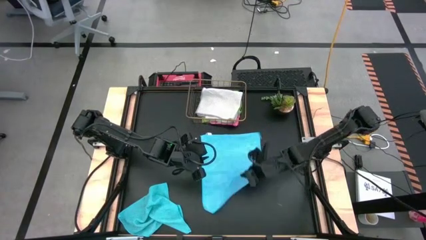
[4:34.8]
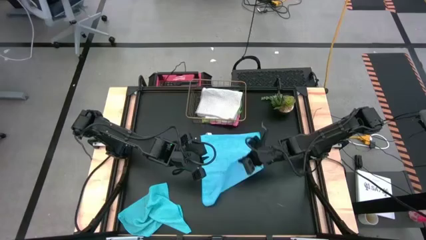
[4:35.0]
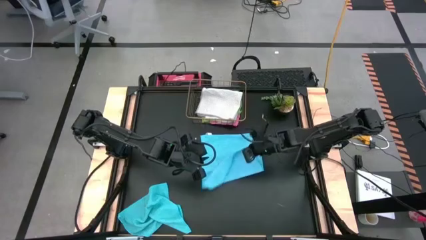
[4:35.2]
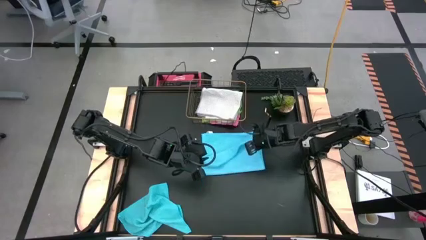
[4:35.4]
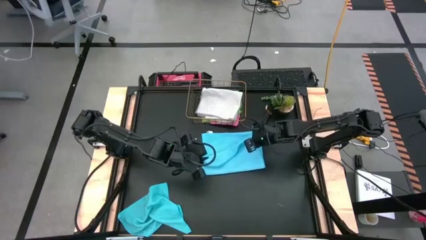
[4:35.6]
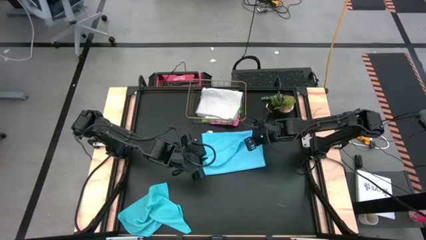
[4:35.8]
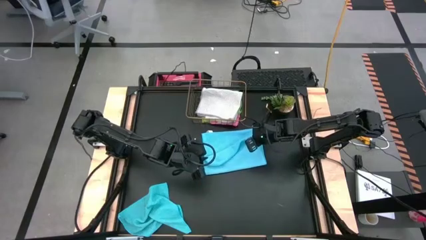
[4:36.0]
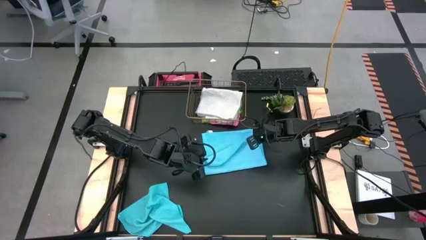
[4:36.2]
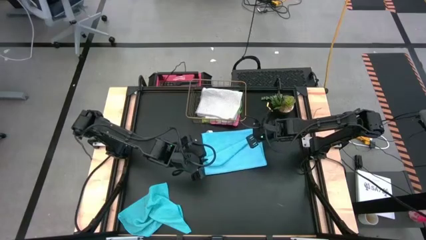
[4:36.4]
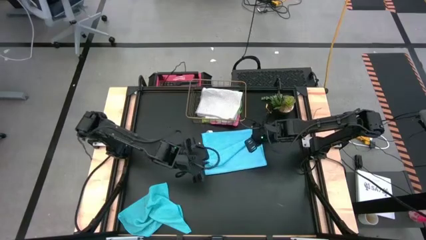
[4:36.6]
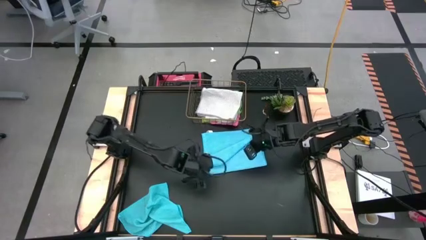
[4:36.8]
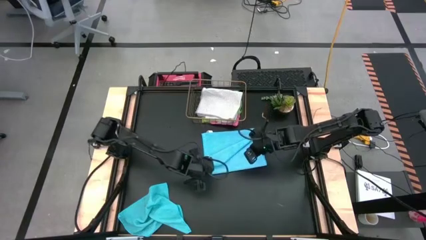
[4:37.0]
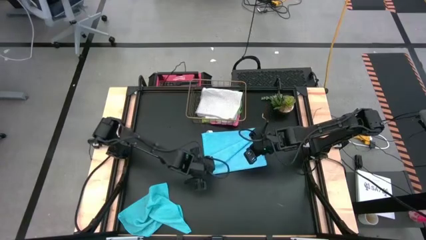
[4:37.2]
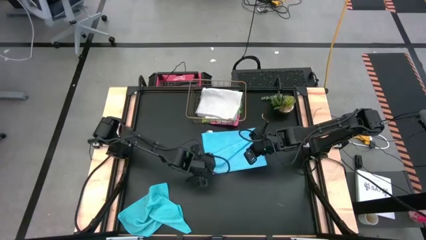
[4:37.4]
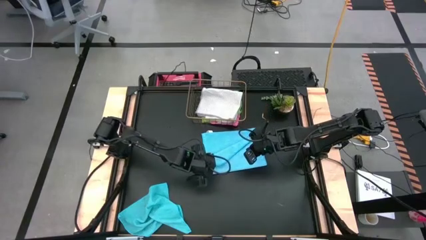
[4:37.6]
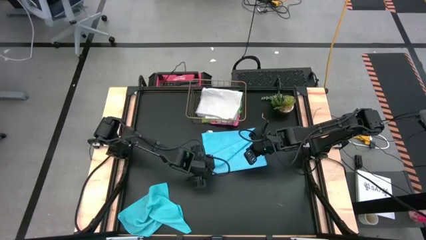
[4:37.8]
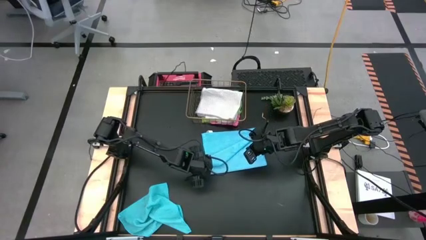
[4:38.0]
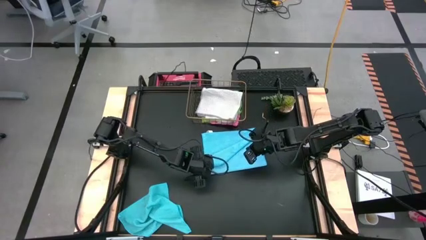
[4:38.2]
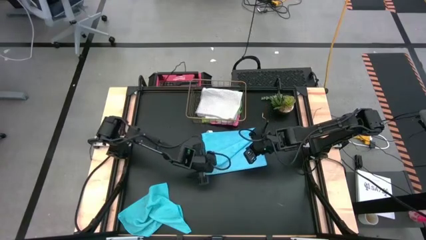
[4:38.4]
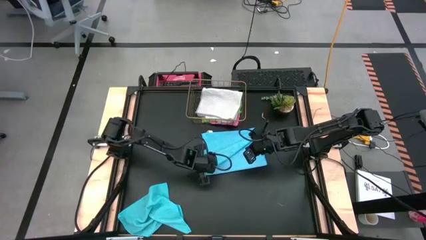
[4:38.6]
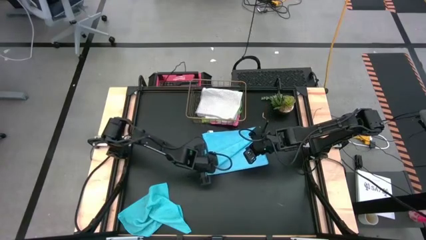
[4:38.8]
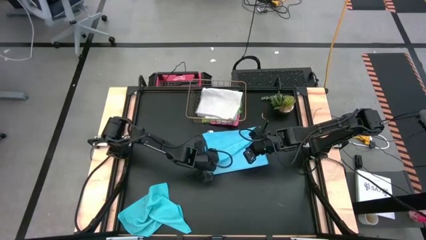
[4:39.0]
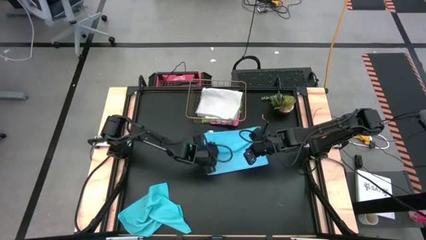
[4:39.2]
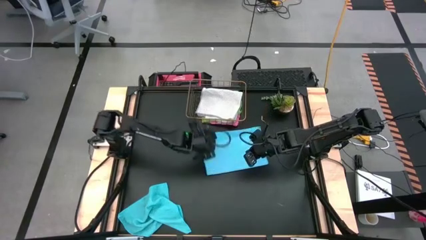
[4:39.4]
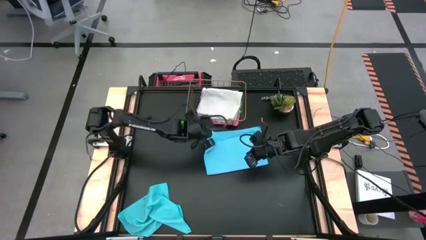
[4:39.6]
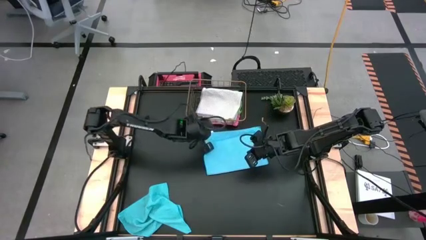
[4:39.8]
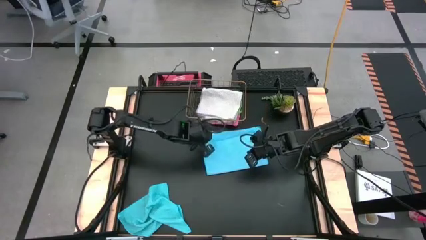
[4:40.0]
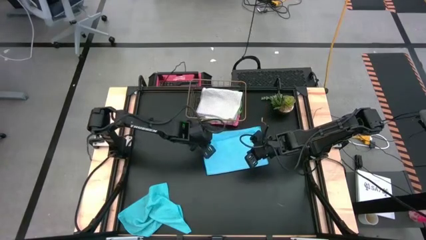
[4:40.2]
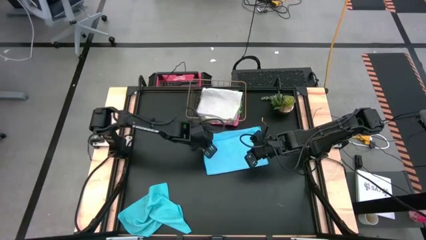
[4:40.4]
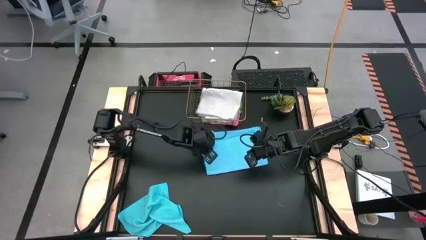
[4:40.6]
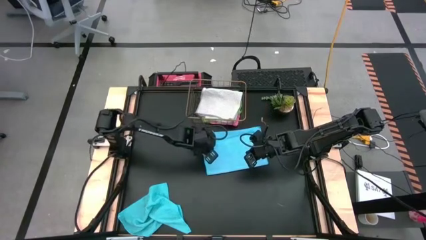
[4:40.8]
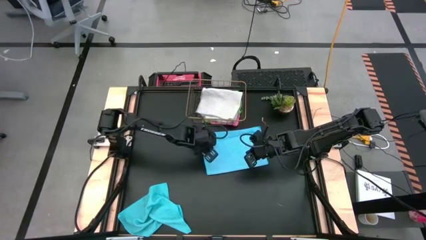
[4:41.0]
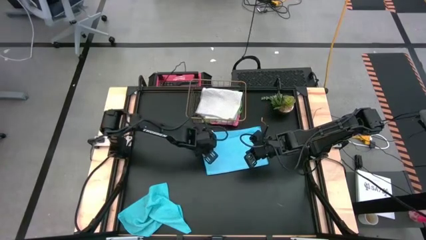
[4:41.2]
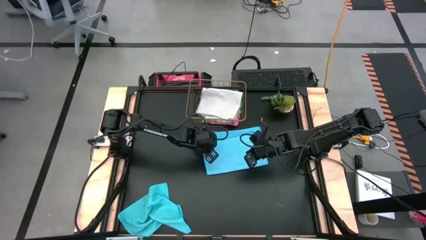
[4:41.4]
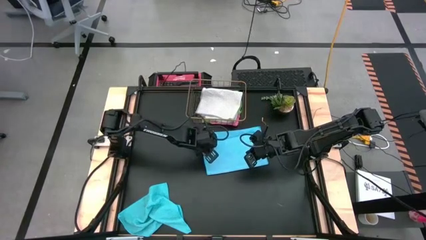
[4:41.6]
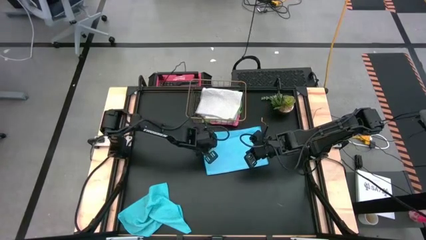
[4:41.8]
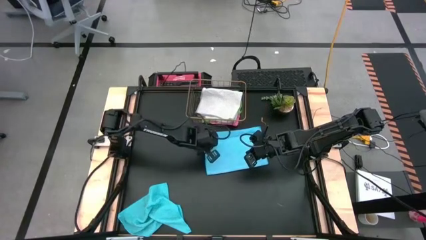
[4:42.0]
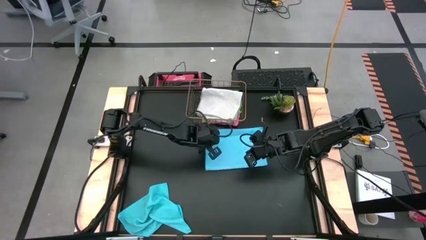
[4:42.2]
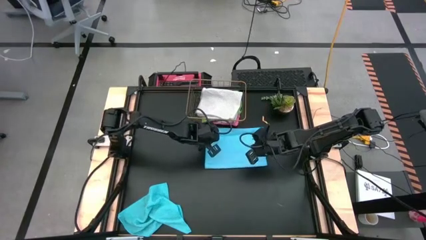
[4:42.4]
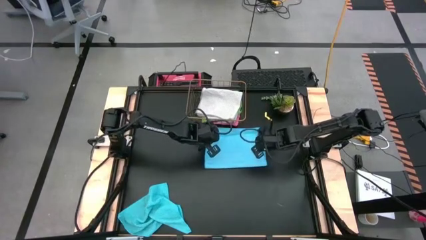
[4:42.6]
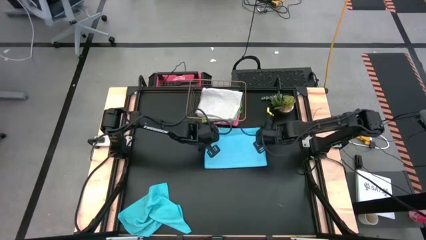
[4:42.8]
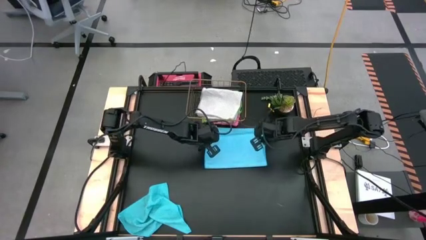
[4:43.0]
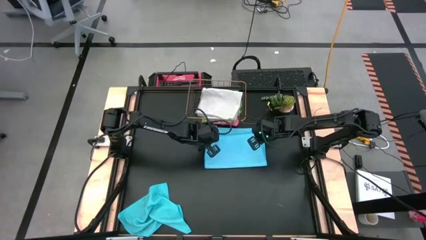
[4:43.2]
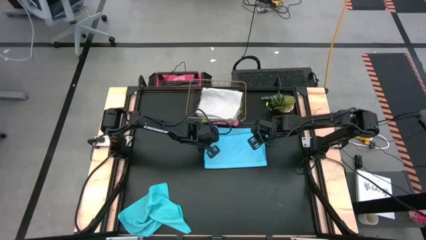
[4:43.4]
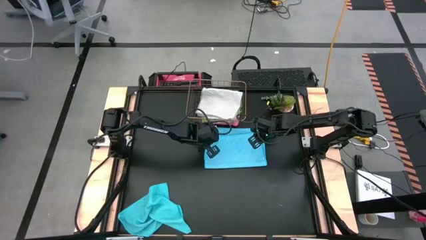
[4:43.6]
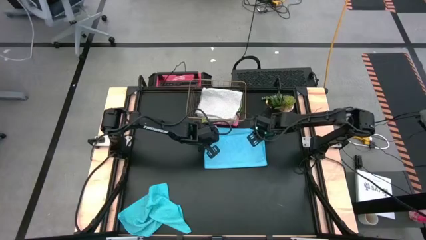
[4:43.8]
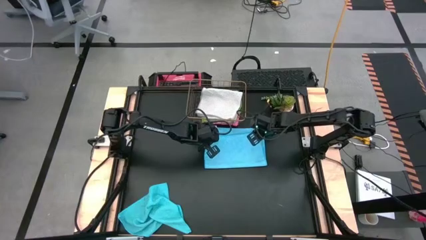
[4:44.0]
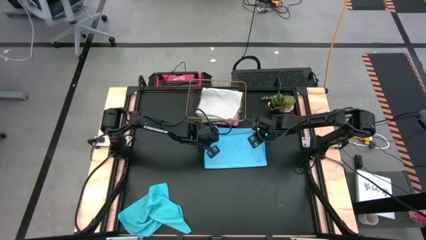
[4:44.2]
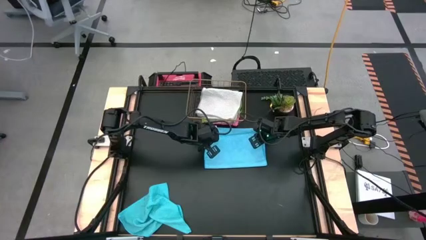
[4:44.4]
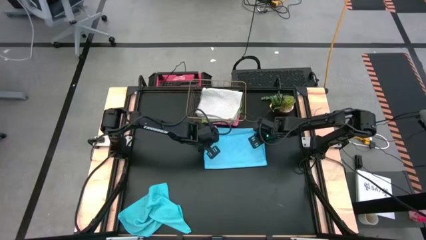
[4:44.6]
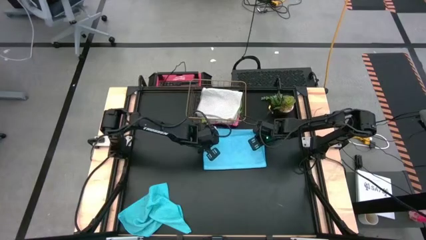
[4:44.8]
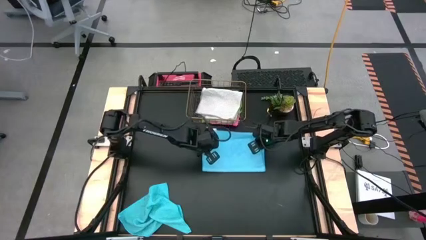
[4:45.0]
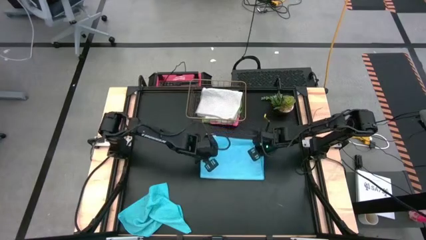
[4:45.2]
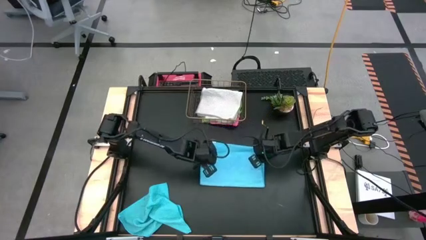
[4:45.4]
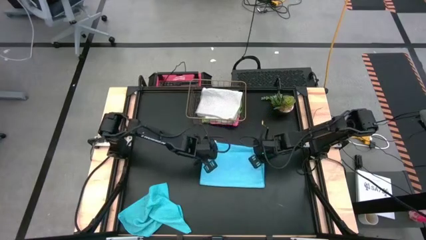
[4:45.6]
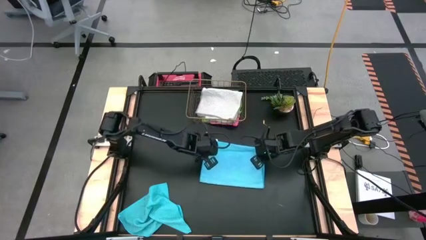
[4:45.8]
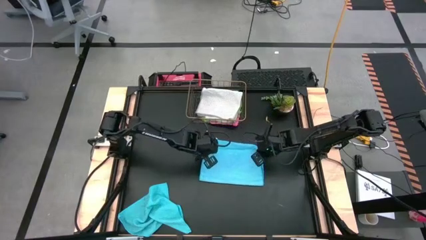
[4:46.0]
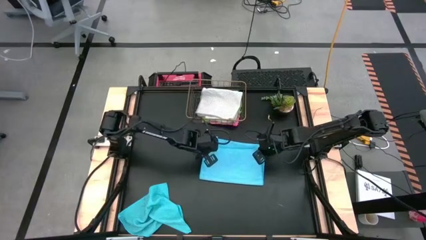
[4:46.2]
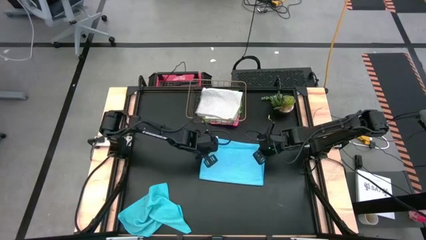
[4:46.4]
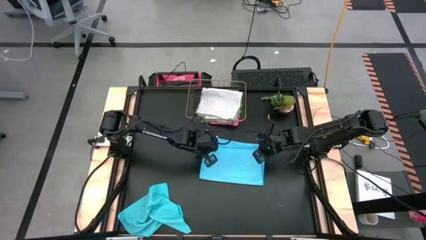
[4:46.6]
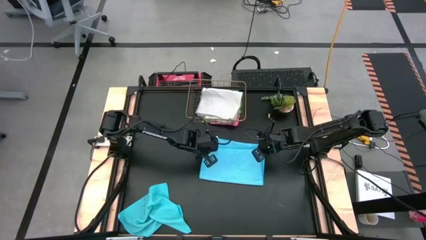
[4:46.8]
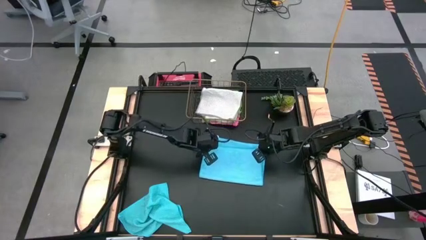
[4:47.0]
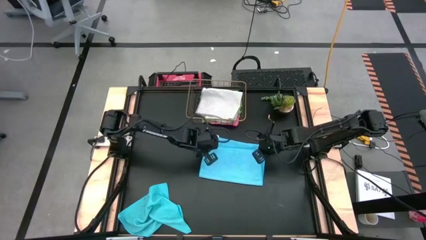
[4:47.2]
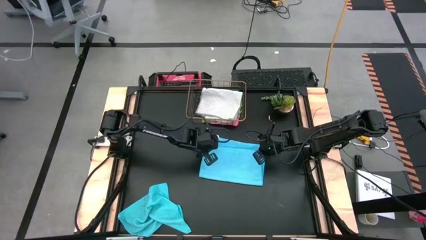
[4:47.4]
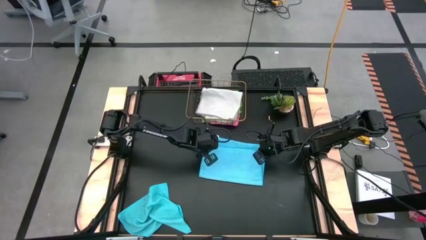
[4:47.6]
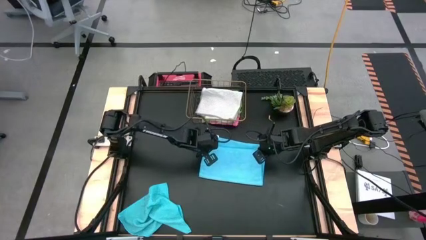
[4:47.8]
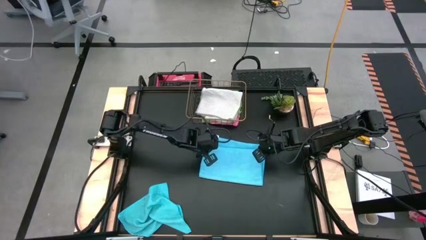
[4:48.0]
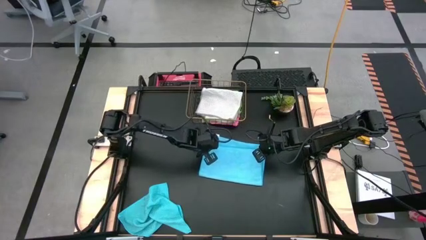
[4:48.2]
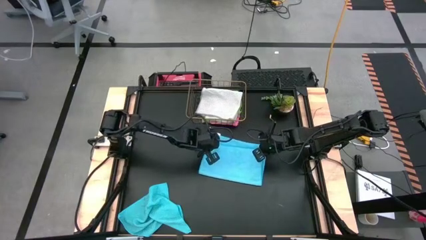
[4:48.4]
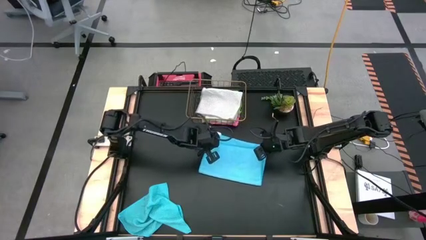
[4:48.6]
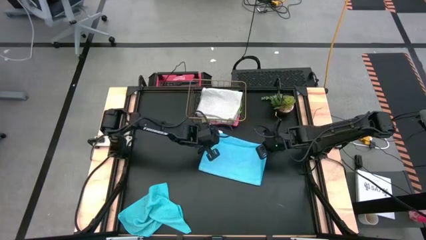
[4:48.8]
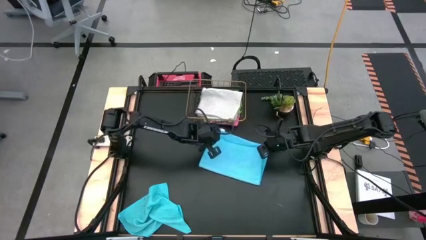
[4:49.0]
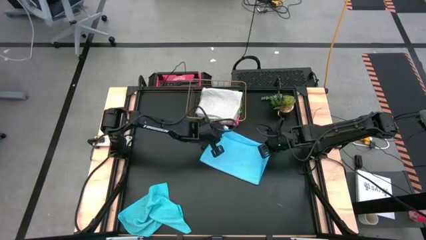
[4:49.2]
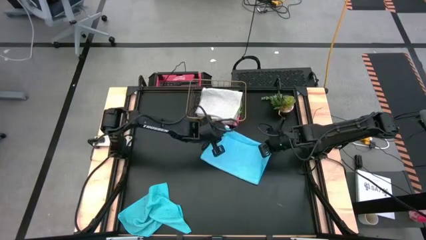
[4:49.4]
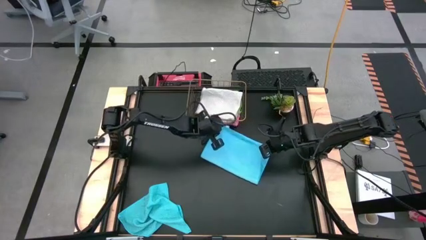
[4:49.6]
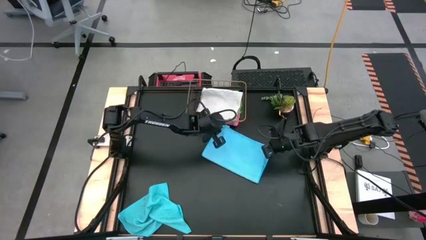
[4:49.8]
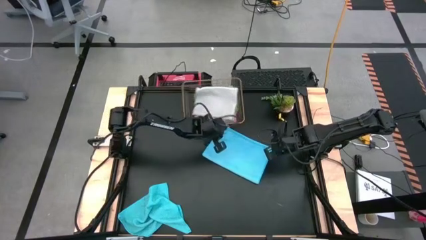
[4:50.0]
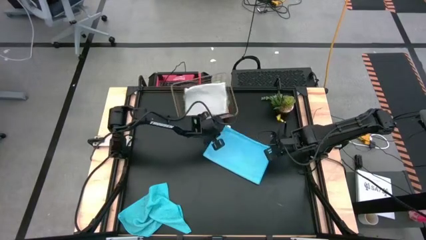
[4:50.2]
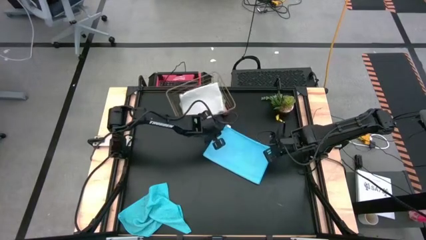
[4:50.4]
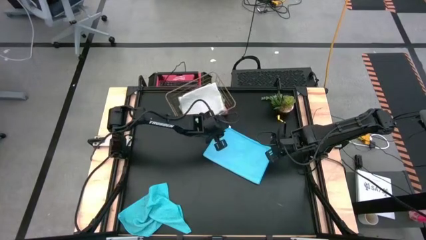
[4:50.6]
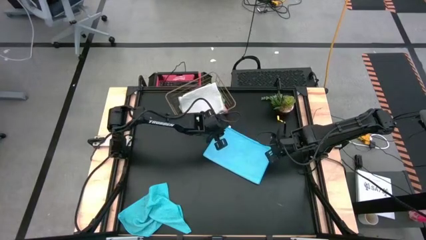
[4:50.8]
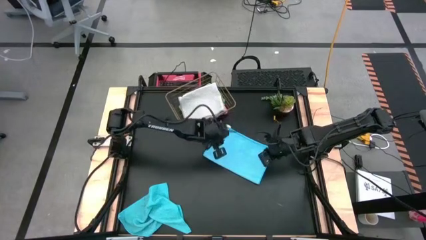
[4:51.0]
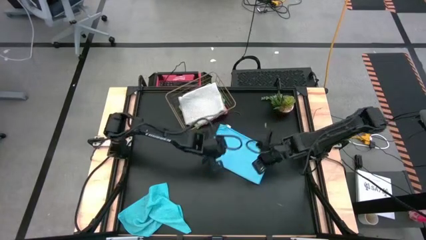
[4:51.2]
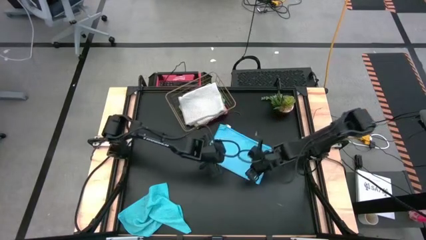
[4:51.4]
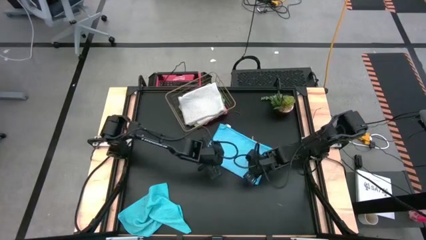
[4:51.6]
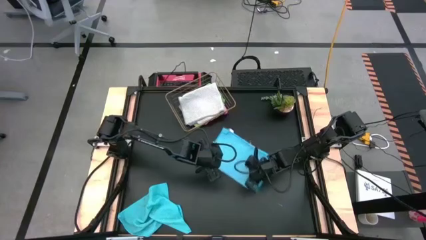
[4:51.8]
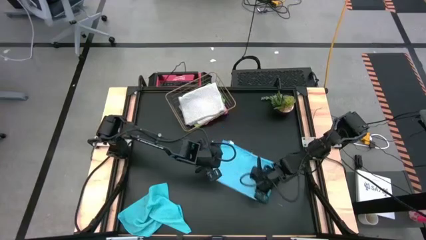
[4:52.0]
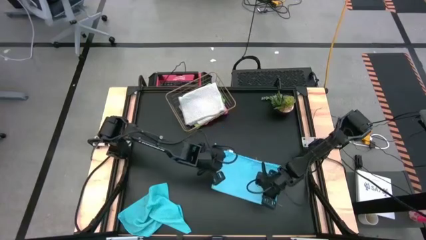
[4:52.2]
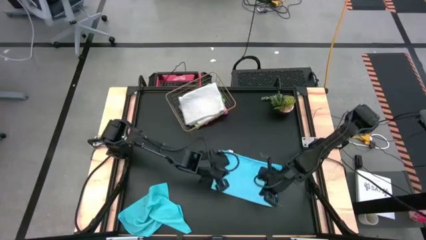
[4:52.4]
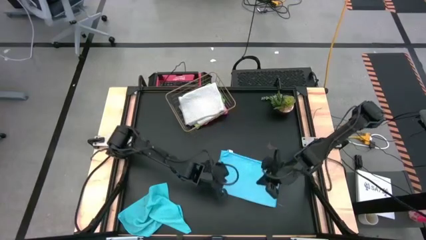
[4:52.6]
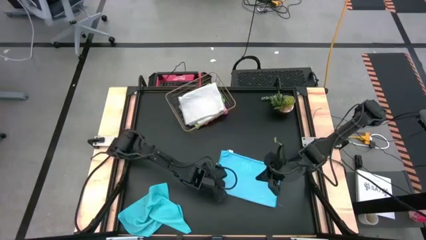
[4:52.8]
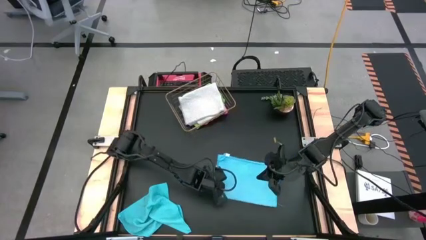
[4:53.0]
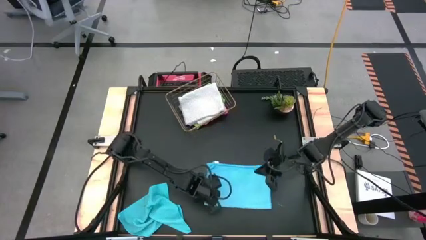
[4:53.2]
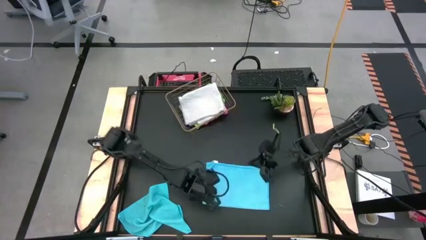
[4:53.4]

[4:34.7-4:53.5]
Task: Fold microfiber towels
Fold the right light blue microfiber cloth in half
